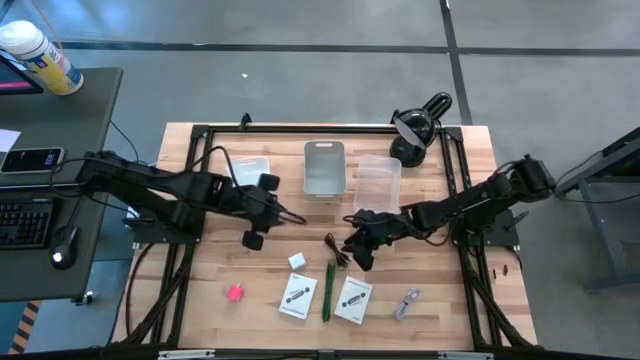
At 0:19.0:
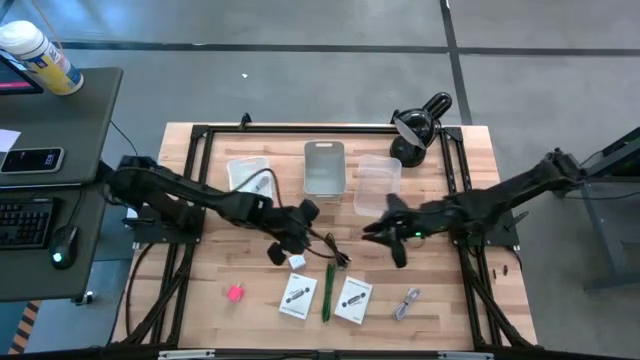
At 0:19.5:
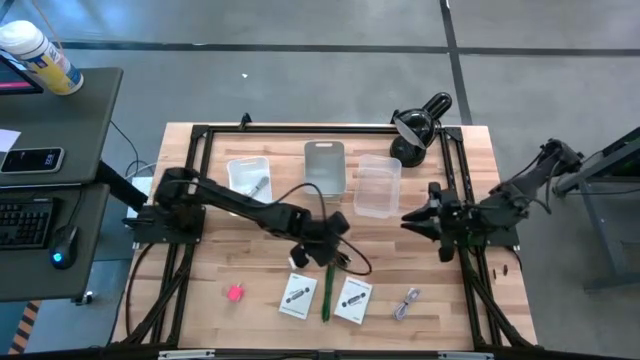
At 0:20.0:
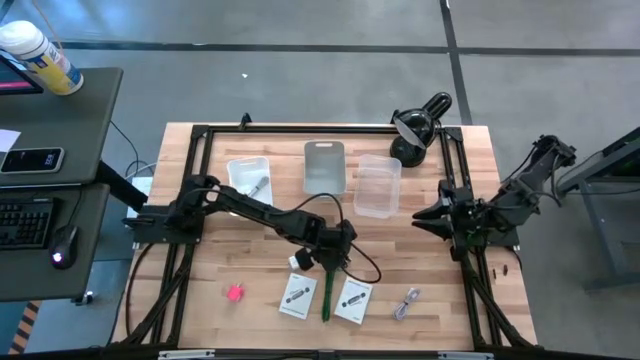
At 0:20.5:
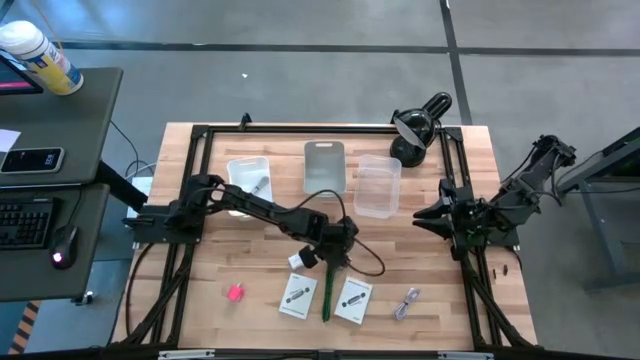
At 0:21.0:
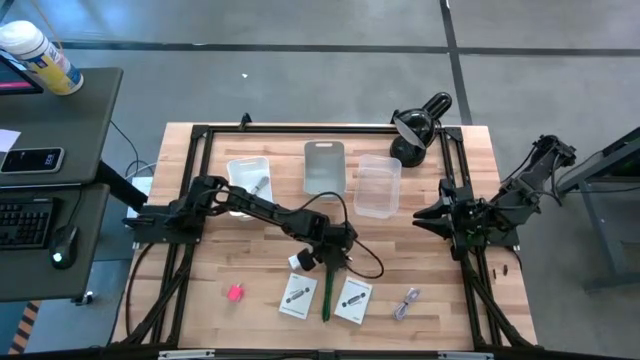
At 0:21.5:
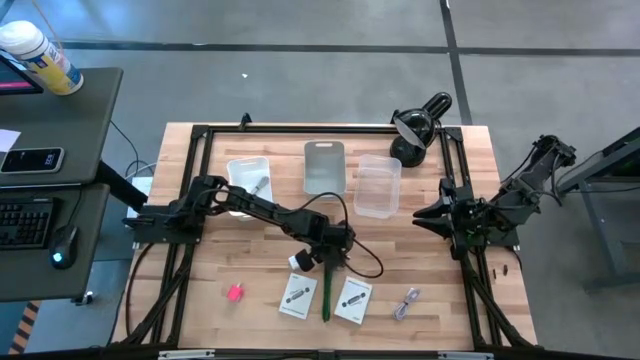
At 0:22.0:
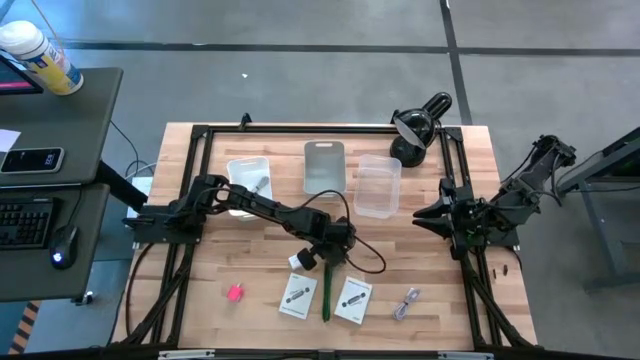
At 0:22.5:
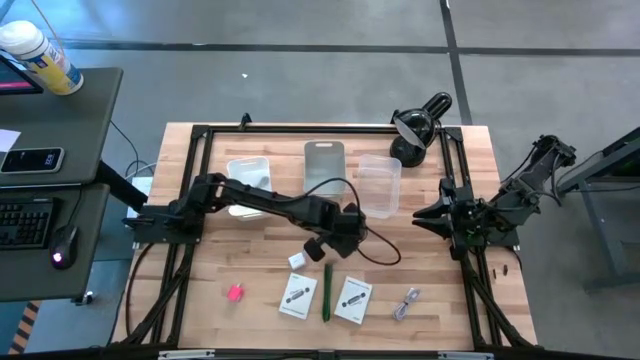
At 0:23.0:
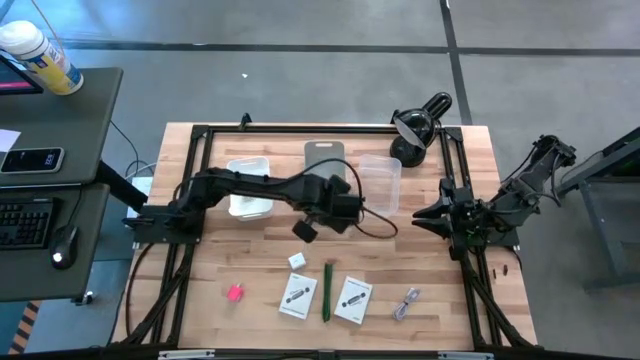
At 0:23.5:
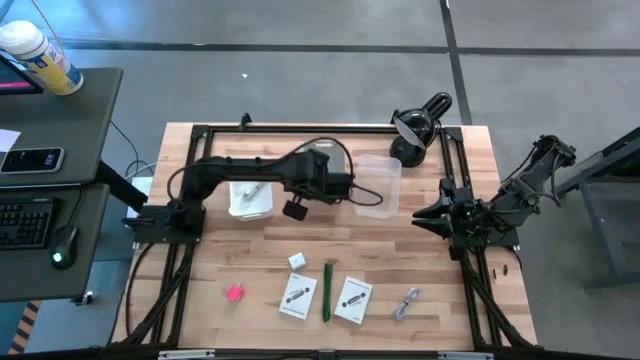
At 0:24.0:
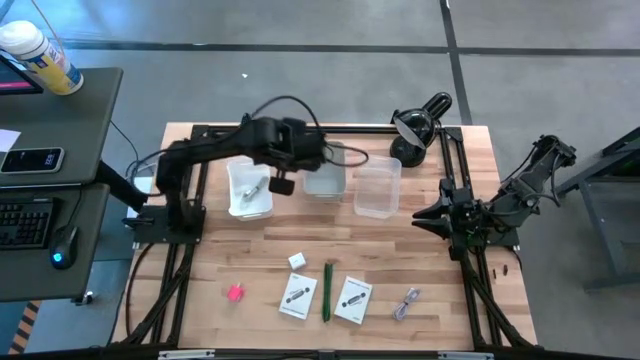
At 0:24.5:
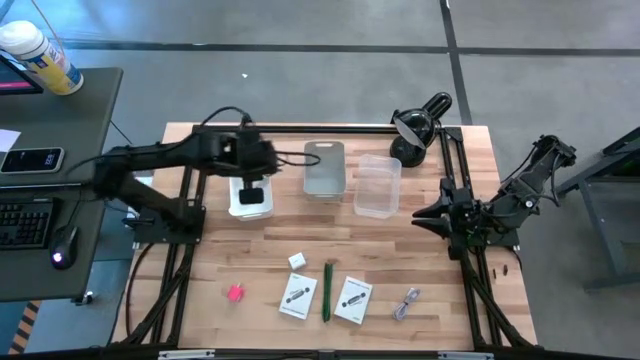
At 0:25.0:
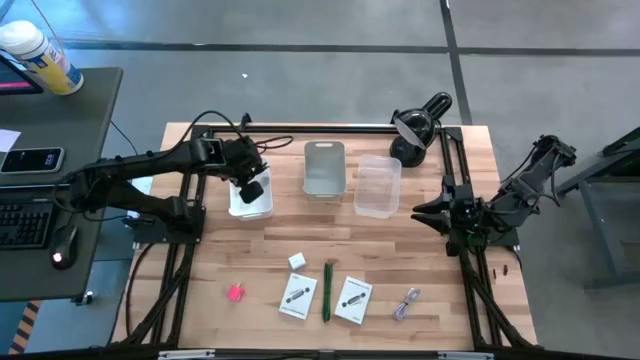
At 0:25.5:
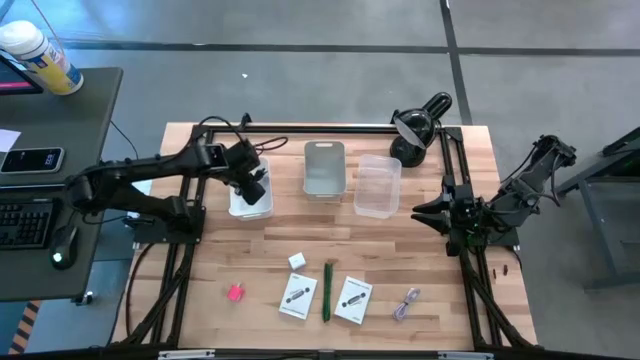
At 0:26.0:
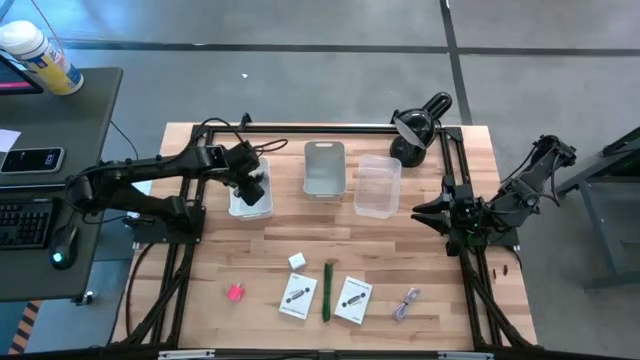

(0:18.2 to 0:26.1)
Task: Pick and place items into bin
Put the black USB cable into the white bin

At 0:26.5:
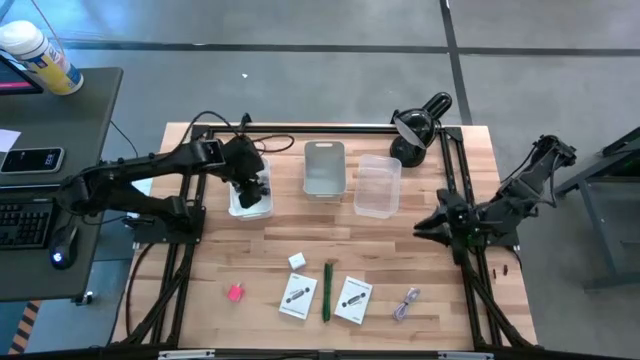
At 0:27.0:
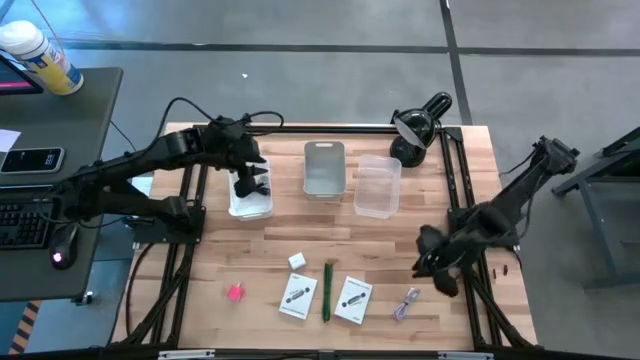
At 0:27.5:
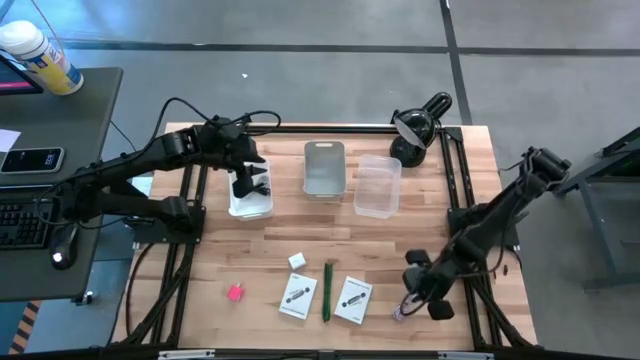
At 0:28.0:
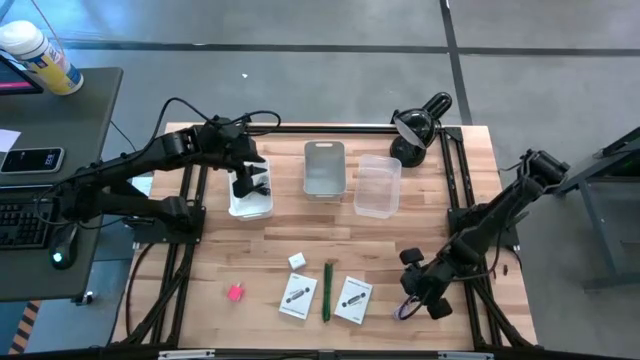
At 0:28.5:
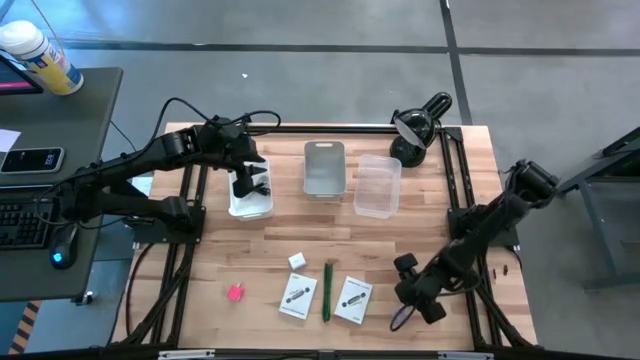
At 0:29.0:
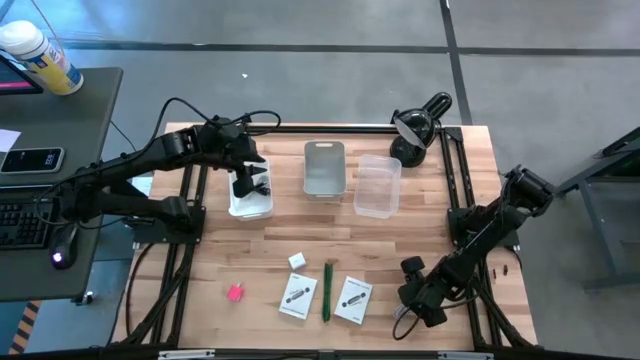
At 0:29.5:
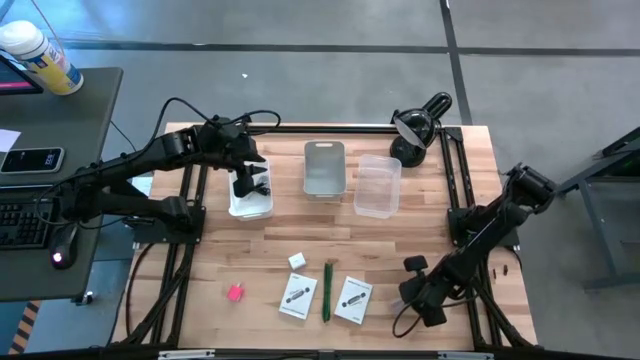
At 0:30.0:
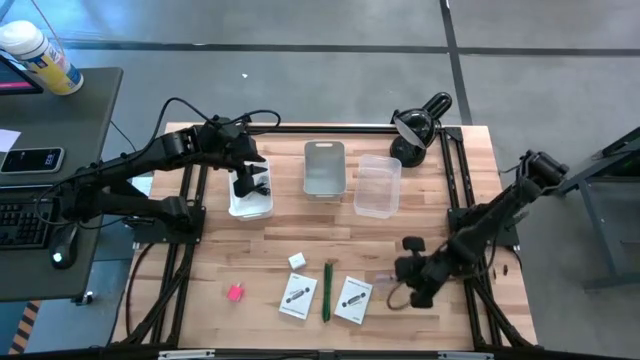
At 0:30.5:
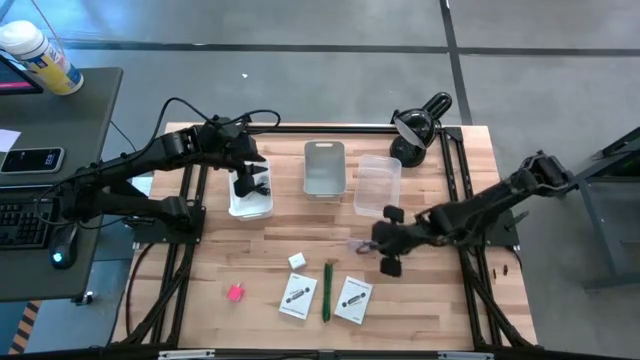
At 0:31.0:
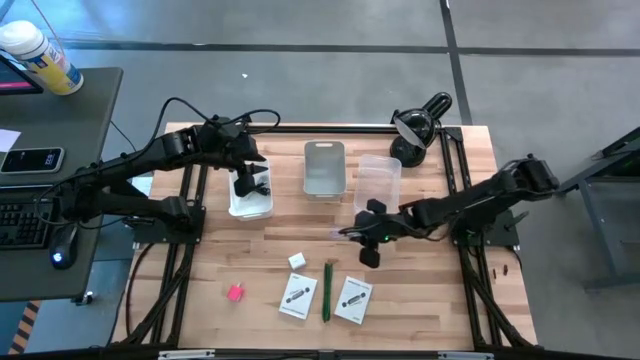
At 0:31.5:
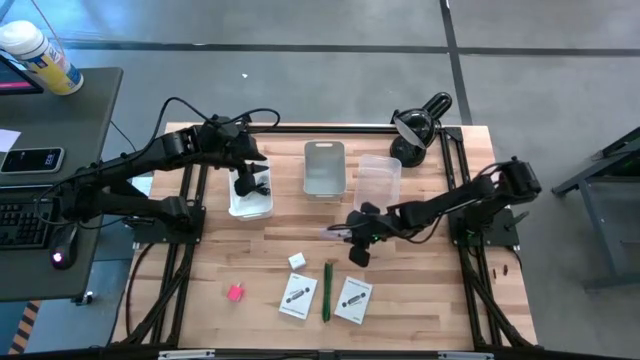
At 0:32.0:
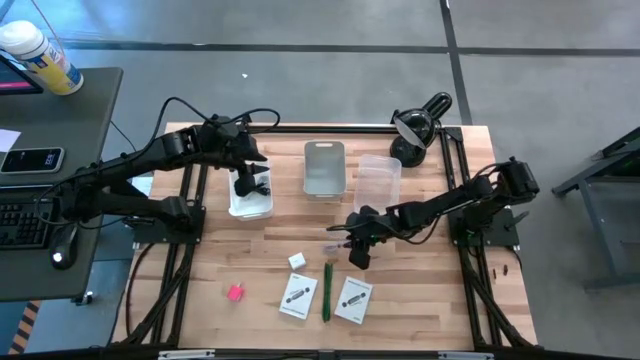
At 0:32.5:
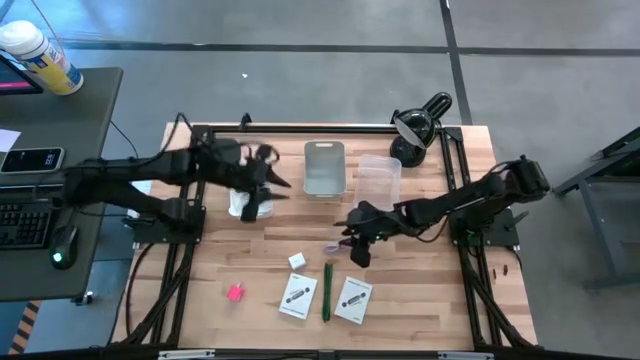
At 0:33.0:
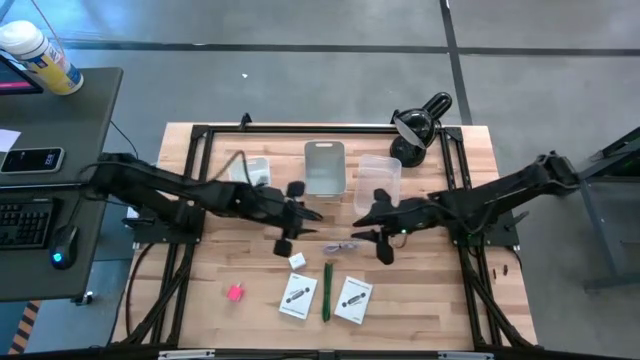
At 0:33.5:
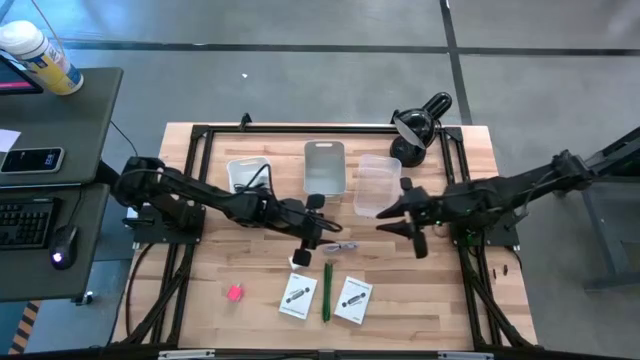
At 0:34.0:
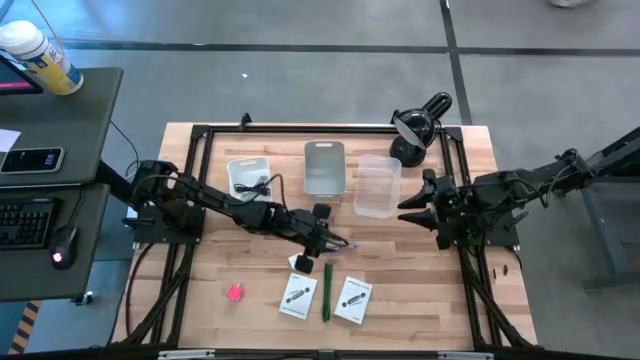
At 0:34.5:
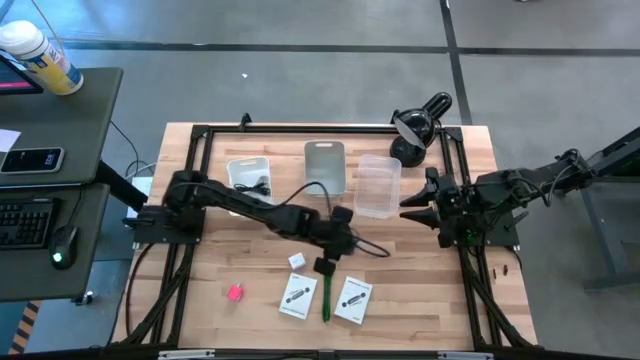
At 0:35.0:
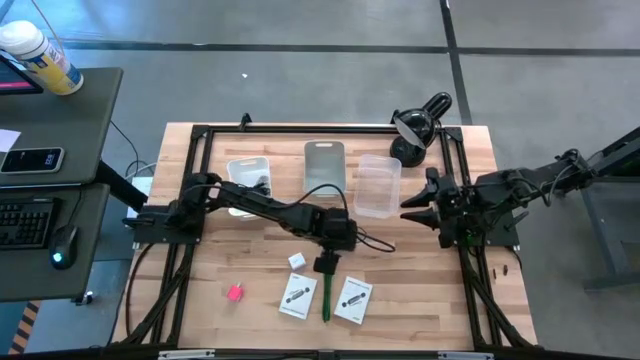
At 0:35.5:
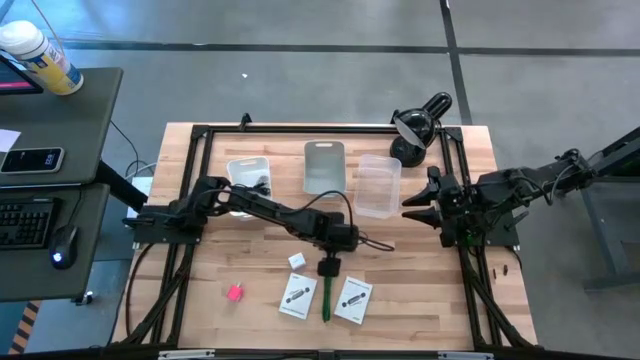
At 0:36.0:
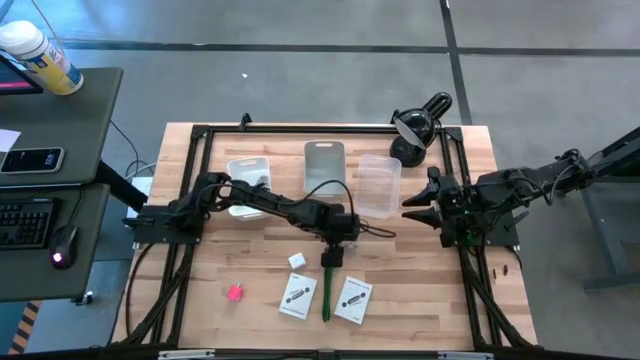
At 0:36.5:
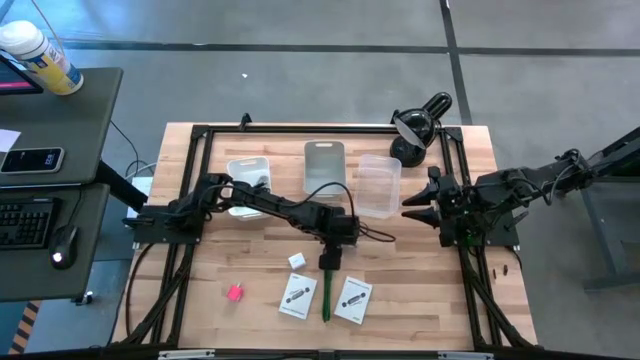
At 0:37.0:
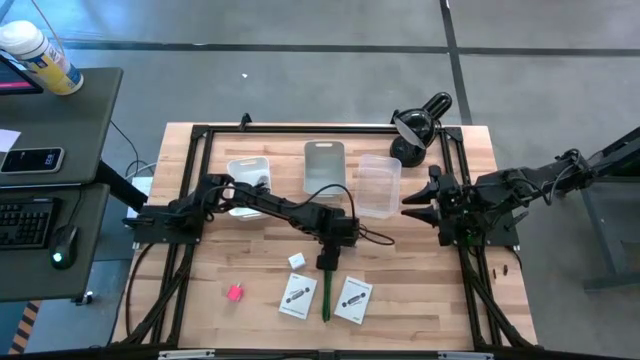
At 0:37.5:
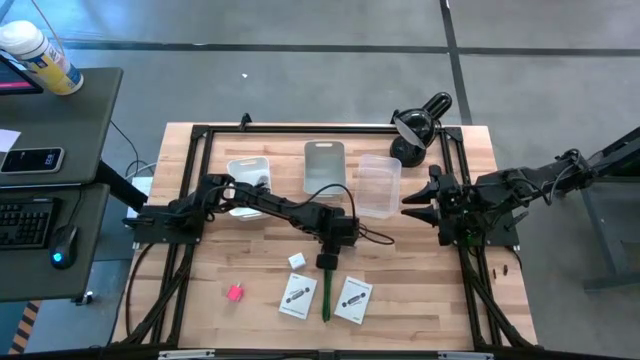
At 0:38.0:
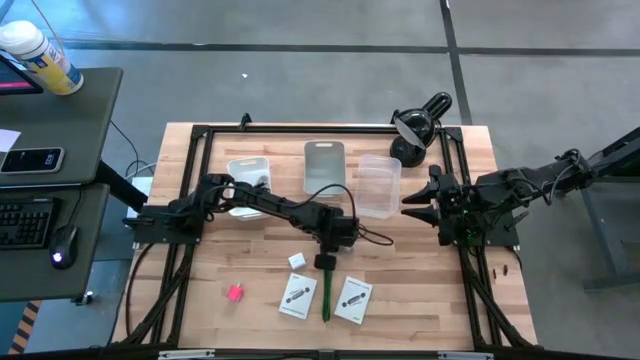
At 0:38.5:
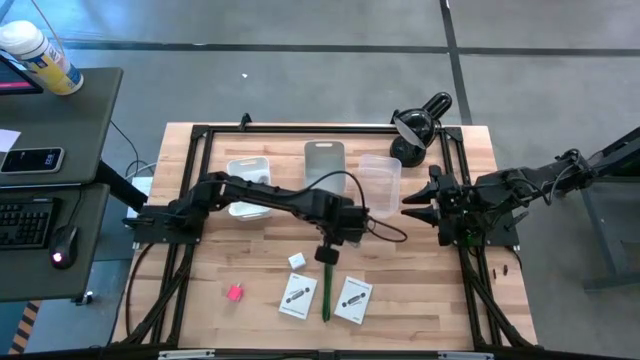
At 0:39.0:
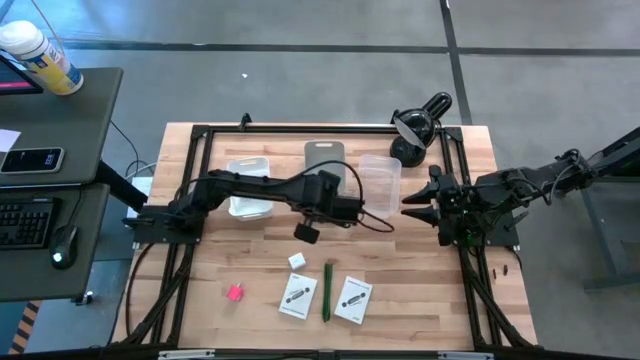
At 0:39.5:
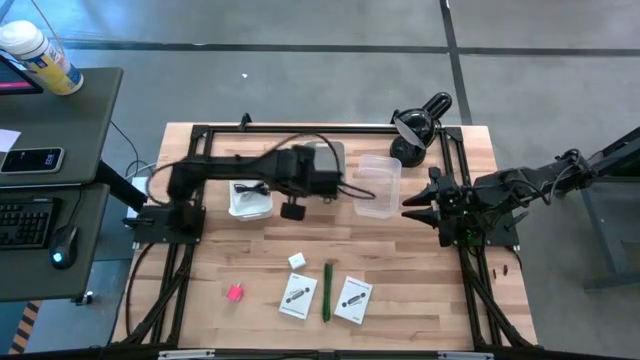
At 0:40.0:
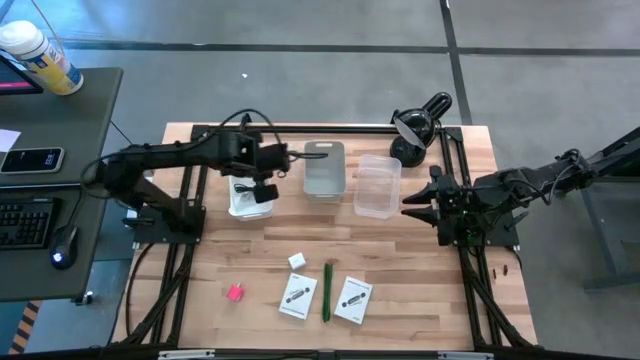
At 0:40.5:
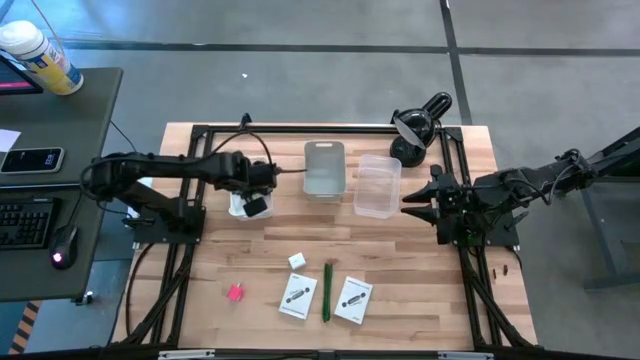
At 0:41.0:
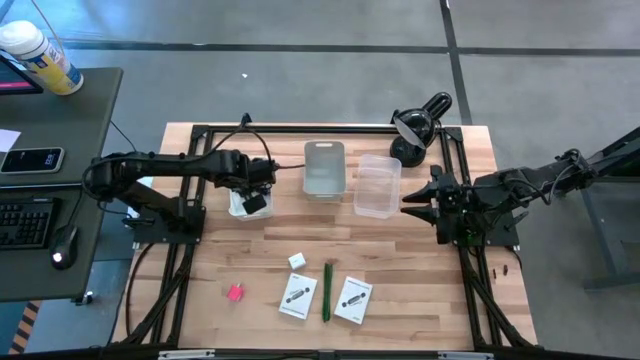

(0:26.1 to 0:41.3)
Put the gray USB cable into the white bin
